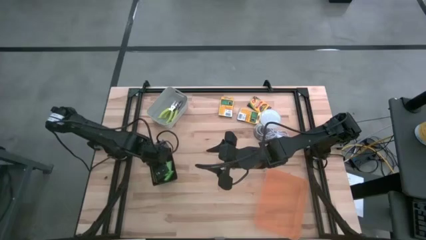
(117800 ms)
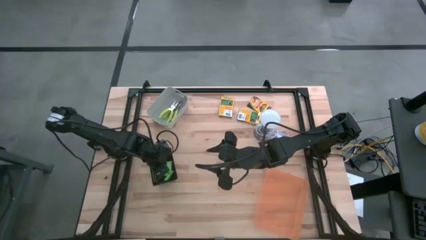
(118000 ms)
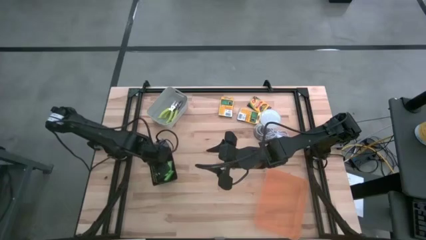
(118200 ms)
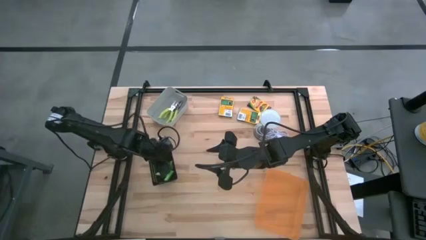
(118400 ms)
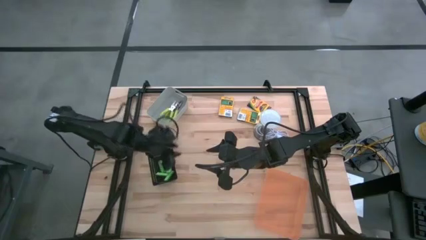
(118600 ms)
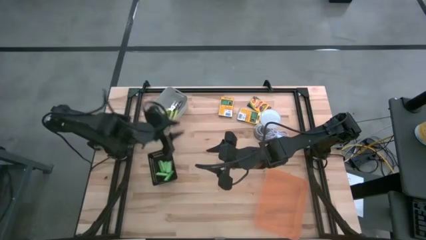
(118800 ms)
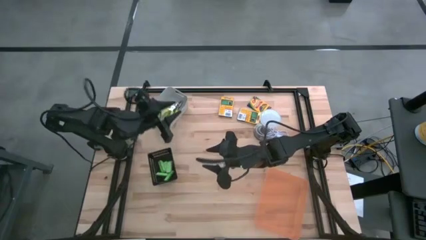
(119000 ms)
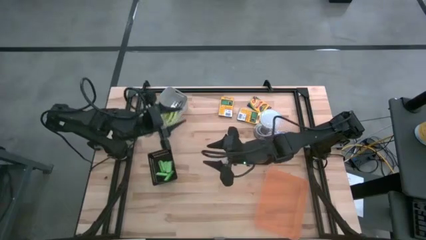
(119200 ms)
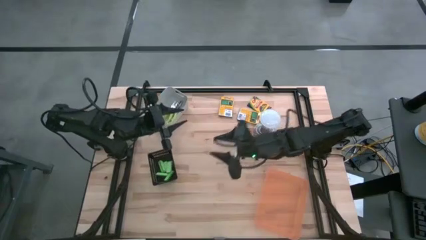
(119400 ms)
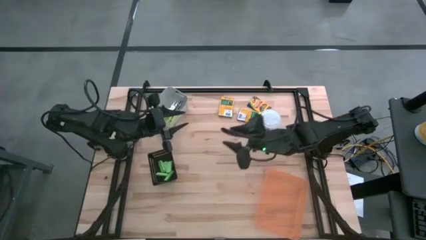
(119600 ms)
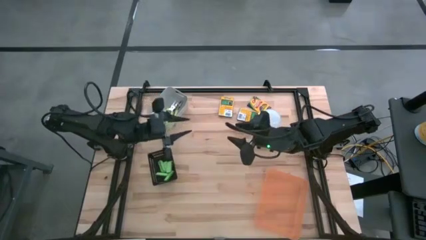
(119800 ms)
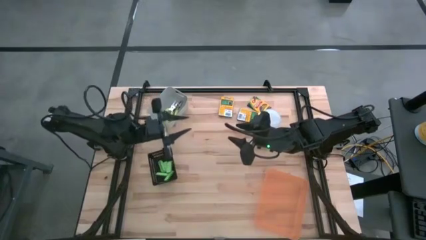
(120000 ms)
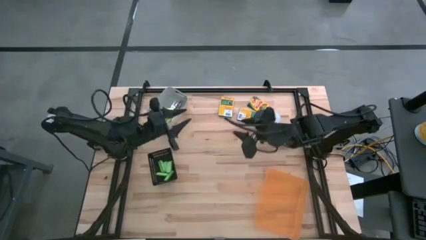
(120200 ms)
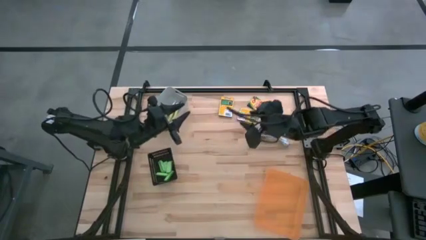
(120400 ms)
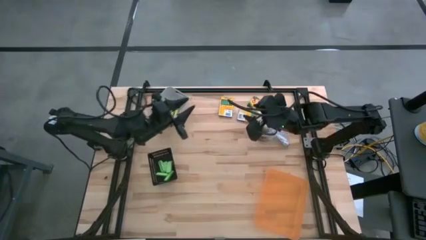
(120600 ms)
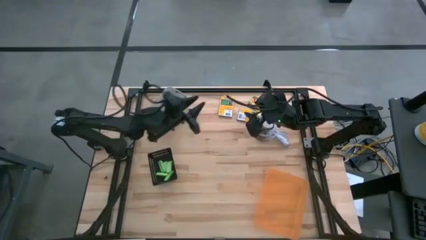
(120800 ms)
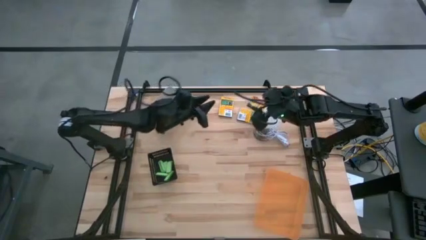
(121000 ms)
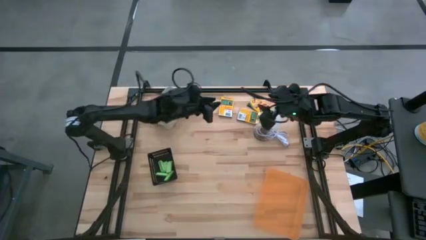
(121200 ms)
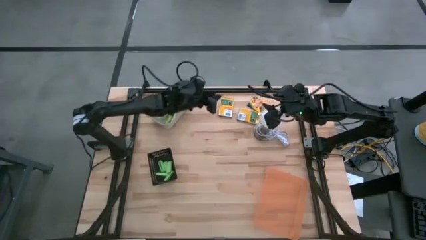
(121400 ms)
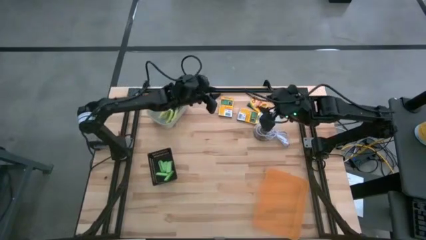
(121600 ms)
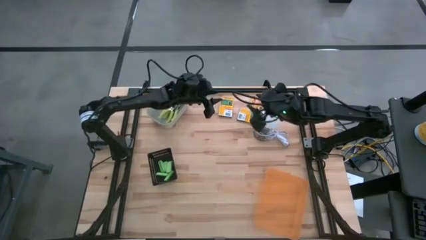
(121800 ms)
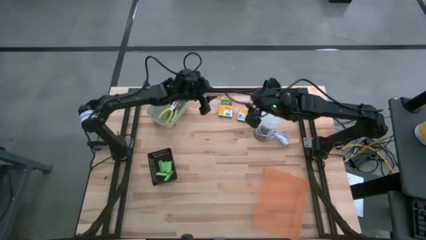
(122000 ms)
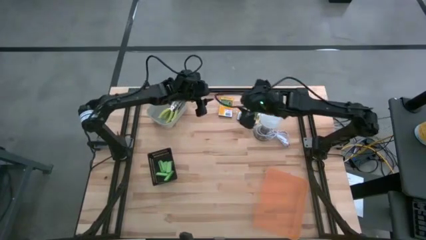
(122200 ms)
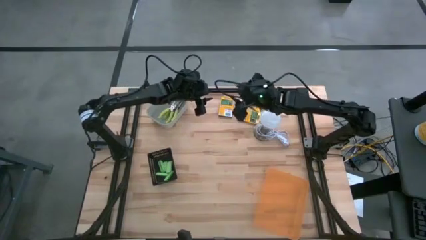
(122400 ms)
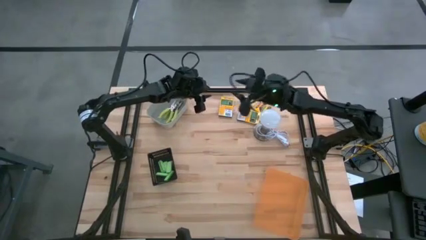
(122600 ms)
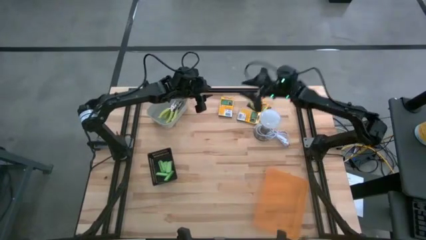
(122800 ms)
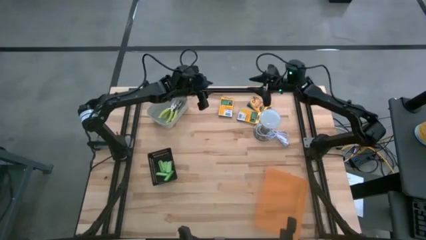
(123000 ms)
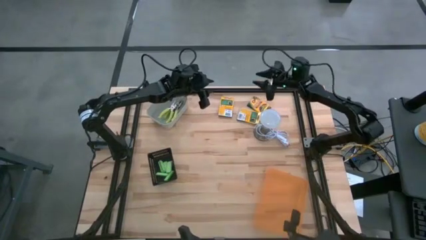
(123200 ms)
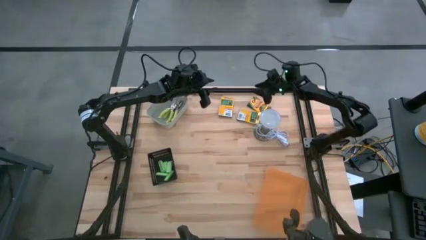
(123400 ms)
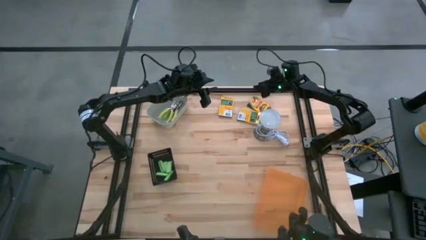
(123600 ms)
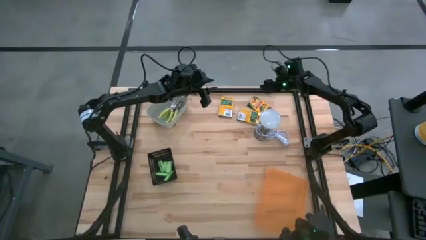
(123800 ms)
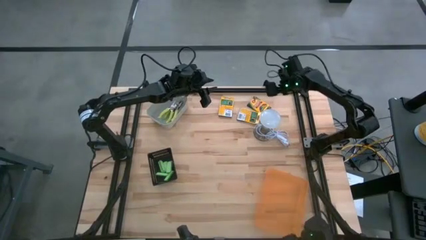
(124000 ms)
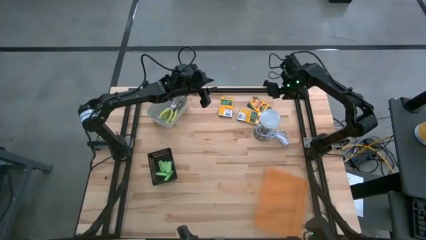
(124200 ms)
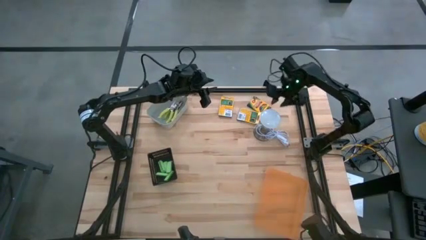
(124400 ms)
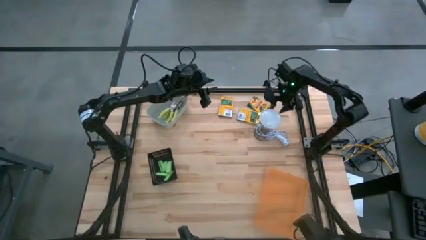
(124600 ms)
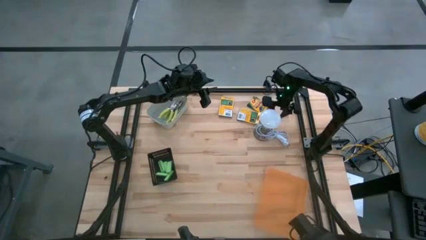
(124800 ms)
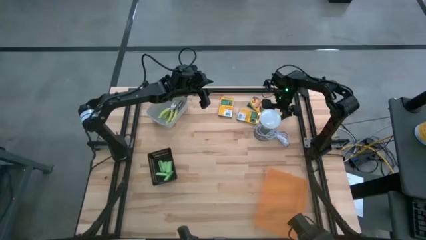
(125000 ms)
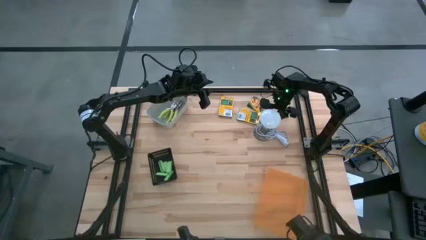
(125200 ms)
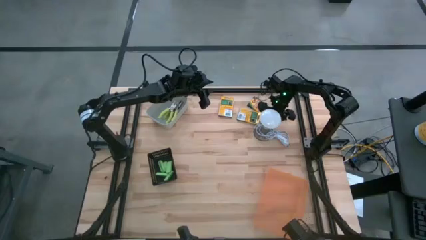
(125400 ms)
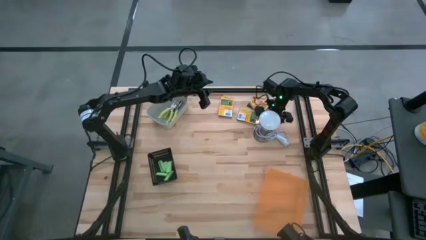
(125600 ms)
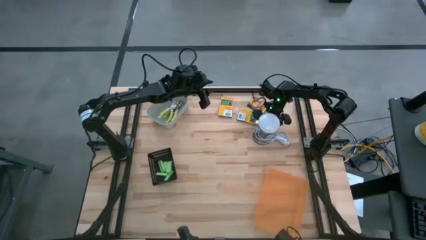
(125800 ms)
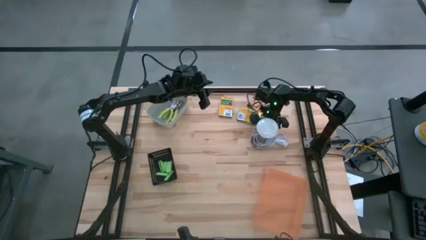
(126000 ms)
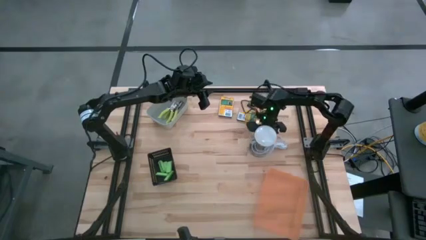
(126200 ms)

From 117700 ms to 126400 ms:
Task: Pick & Place School Supplies
Adjust the lamp on the table

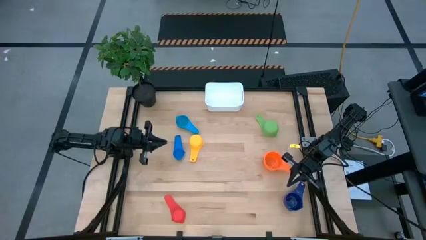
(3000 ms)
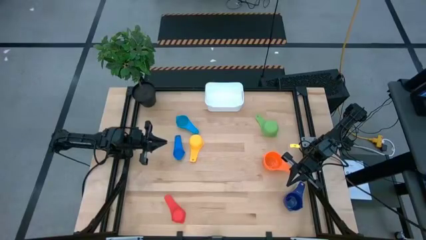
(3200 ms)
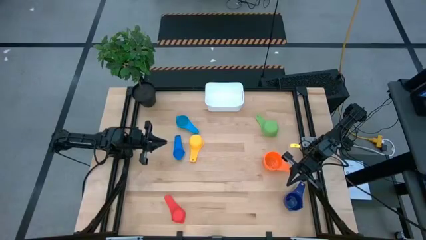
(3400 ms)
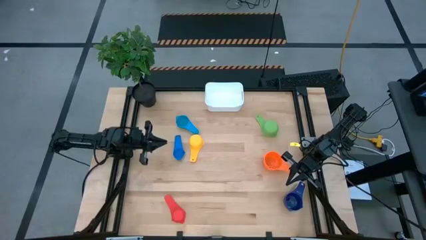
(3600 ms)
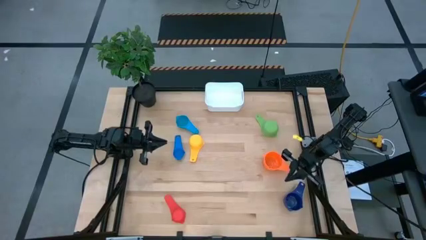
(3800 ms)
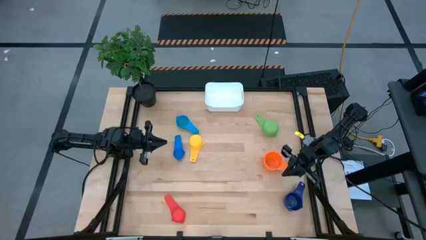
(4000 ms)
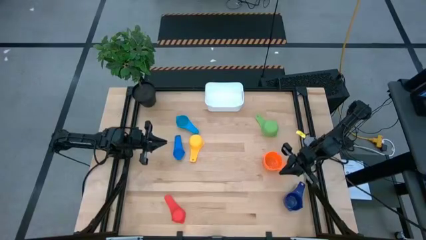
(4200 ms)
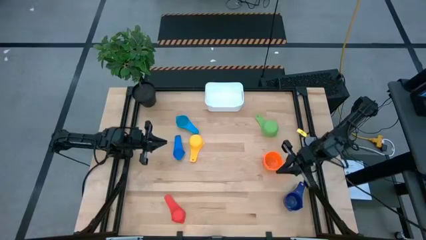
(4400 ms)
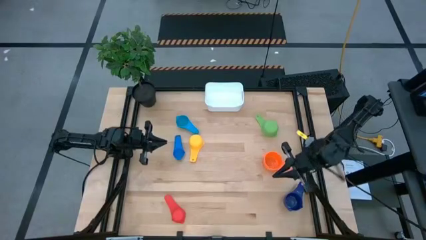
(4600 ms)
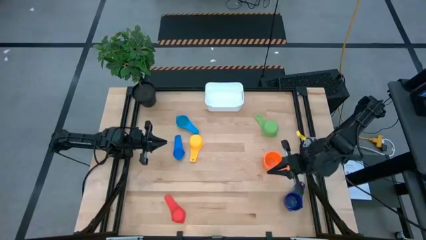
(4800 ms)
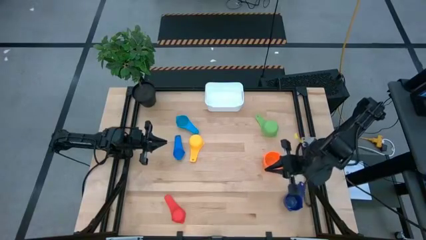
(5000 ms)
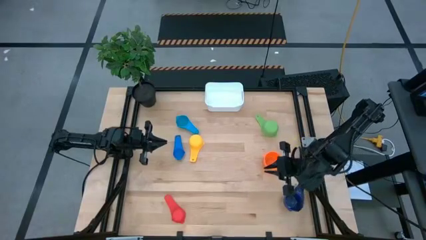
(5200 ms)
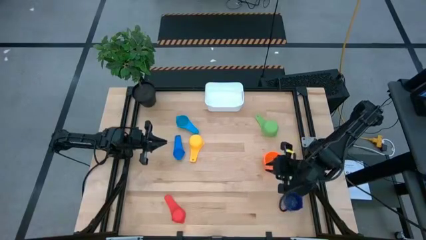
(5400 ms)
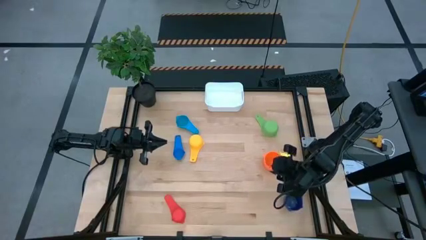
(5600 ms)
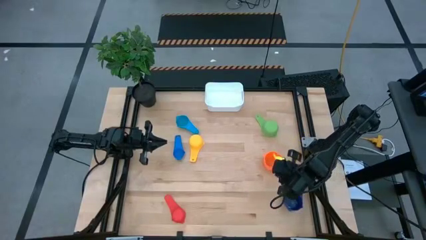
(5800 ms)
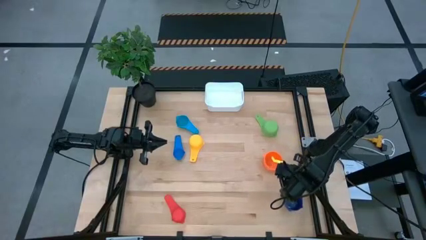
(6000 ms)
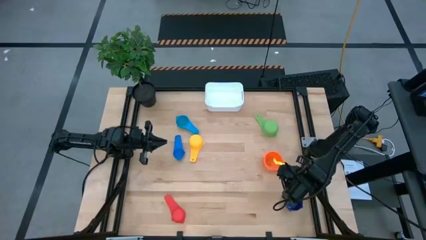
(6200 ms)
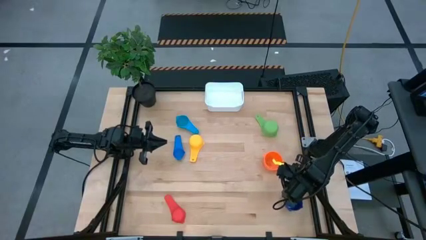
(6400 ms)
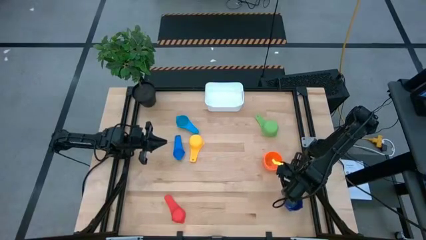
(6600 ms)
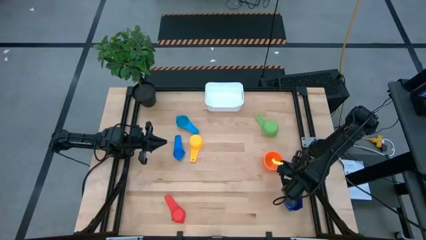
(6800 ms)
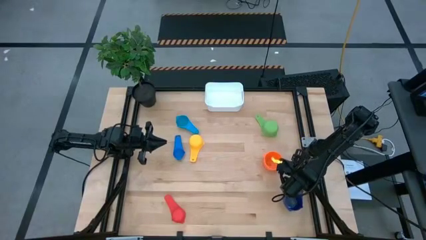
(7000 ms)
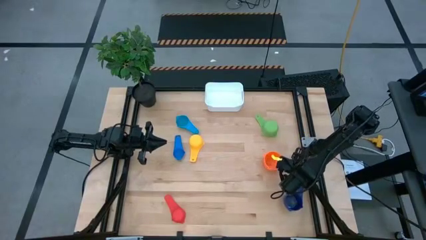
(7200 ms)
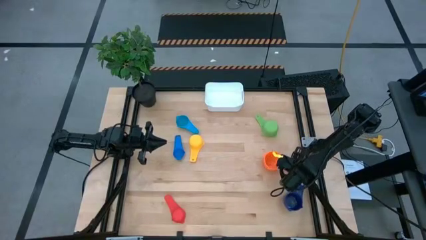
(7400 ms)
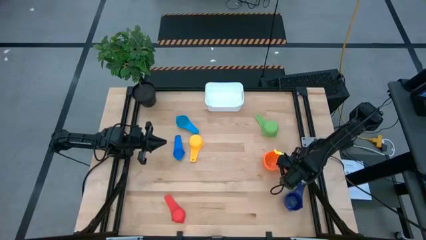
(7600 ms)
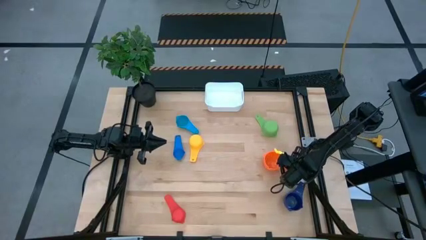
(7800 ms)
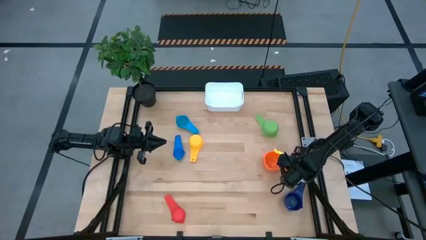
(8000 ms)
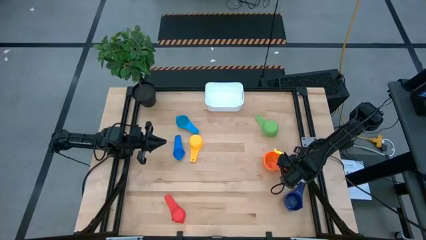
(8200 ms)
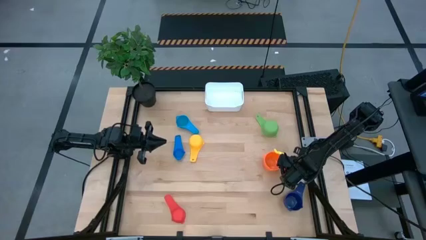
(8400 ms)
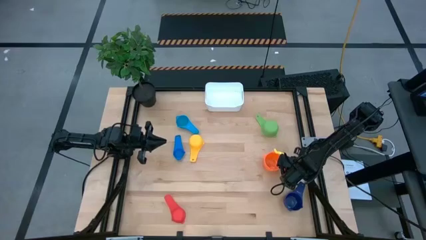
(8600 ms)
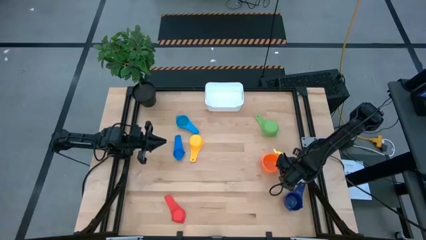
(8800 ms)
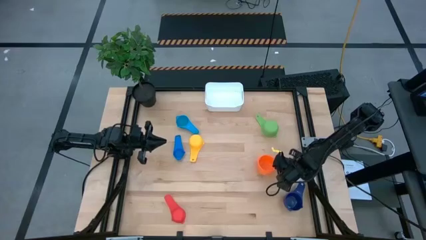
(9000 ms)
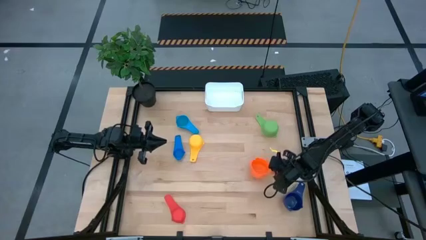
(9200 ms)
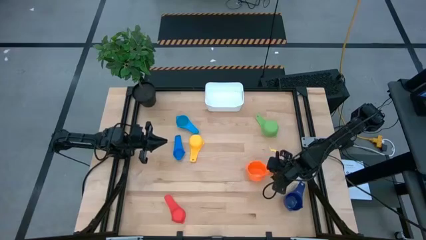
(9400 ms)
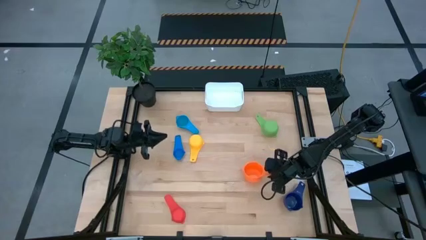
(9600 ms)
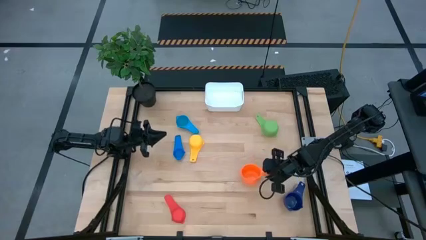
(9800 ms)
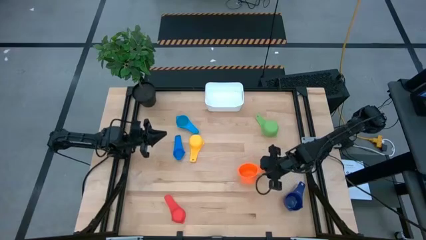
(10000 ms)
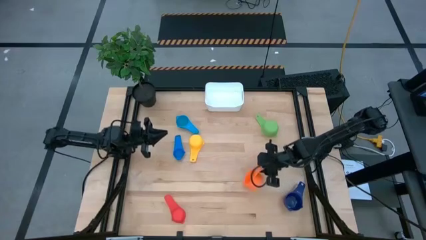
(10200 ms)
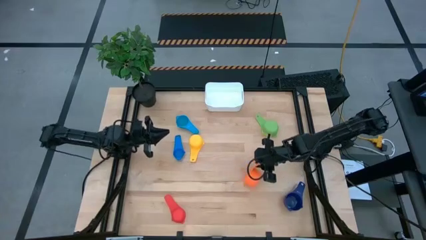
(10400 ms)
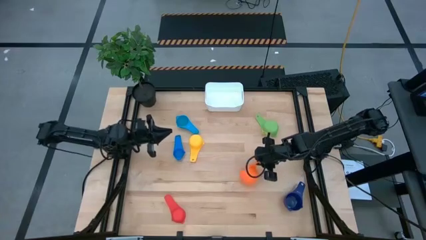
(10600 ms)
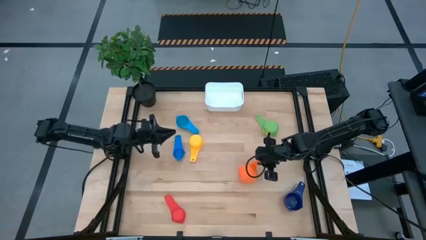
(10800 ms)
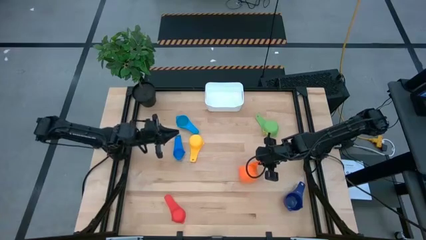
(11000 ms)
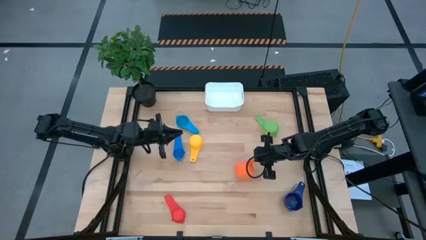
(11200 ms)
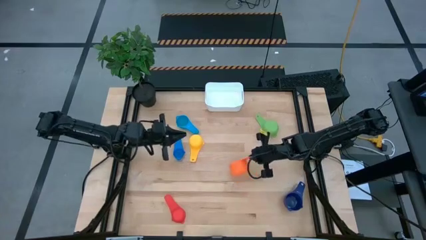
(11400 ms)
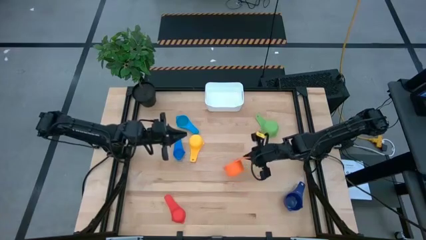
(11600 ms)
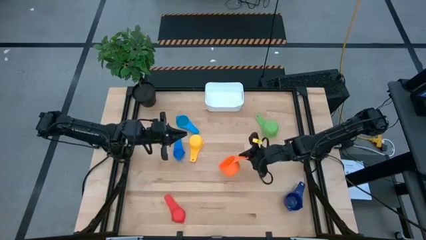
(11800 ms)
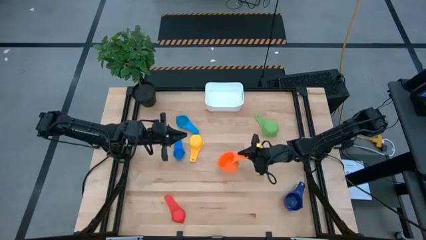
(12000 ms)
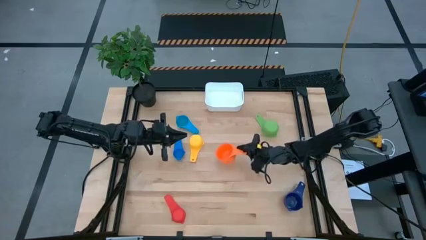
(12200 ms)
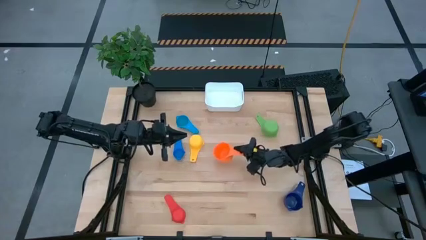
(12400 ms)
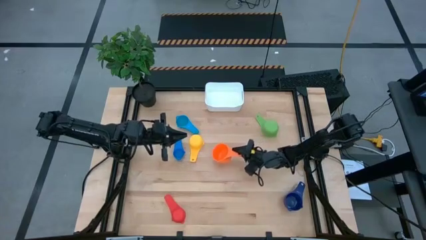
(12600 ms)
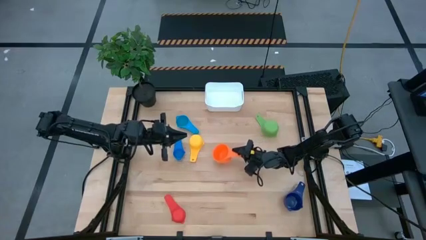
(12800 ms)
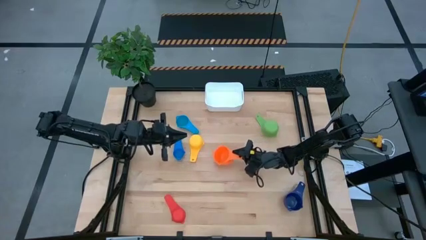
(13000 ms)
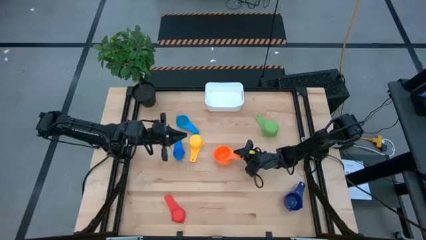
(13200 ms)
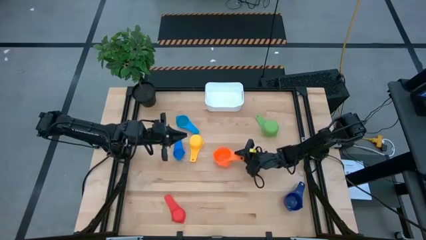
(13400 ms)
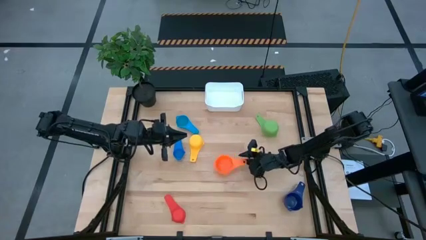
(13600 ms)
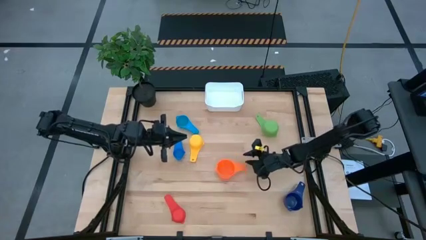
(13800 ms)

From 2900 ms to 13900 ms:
Task: Nest measuring cups in basket
Move the orange measuring cup to the center of the table
